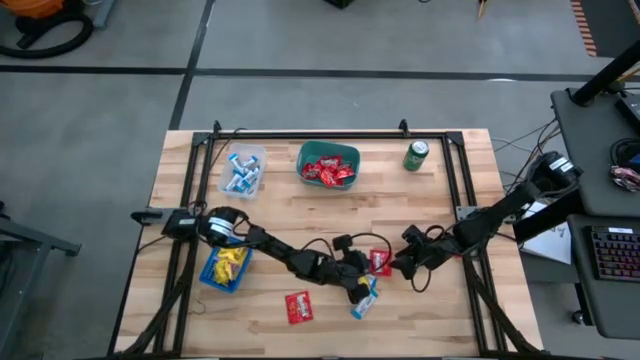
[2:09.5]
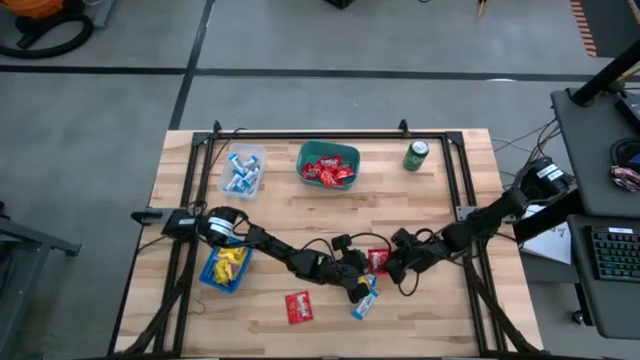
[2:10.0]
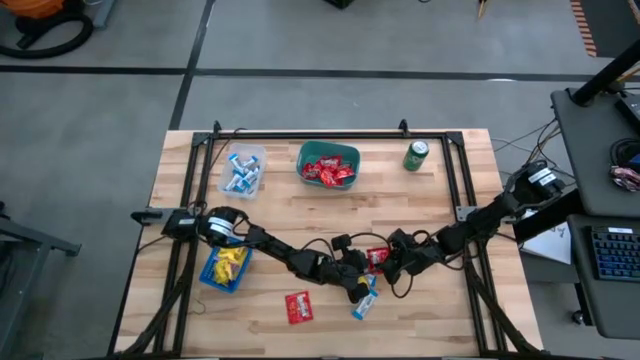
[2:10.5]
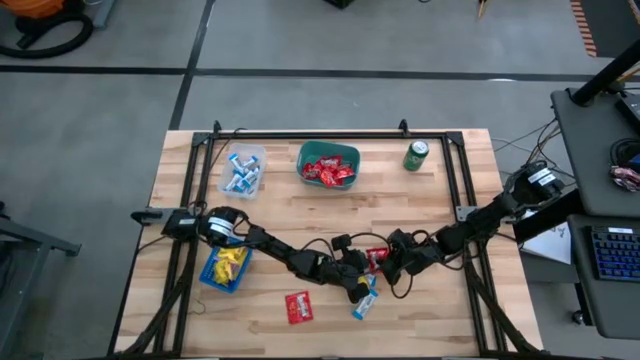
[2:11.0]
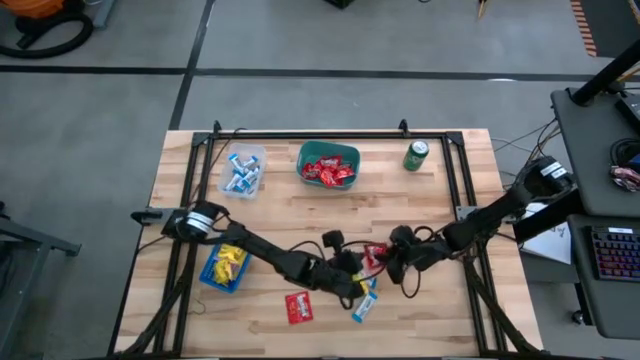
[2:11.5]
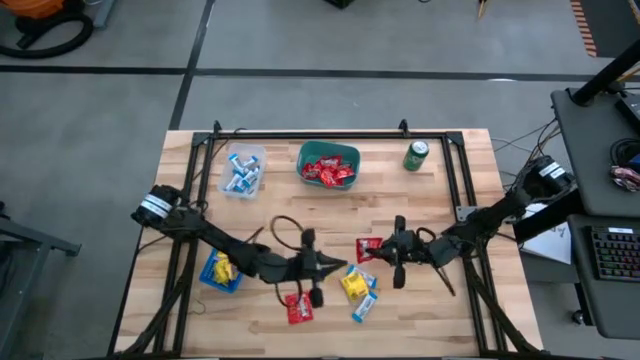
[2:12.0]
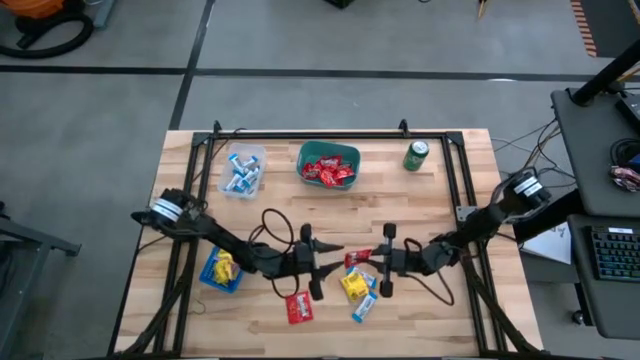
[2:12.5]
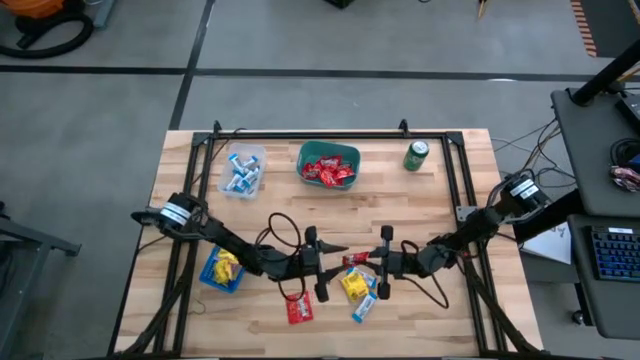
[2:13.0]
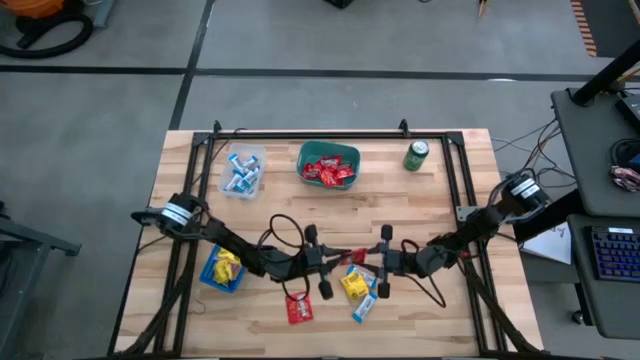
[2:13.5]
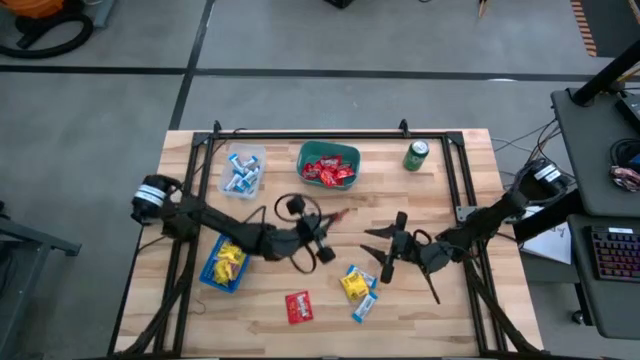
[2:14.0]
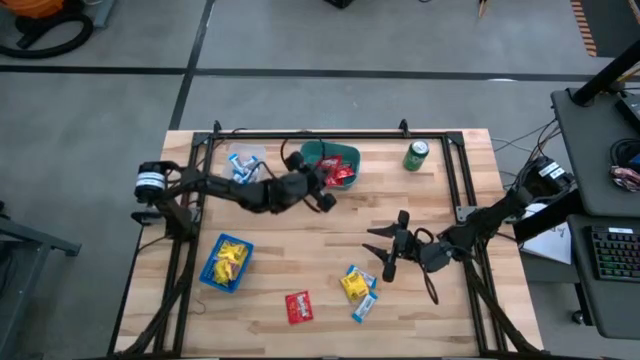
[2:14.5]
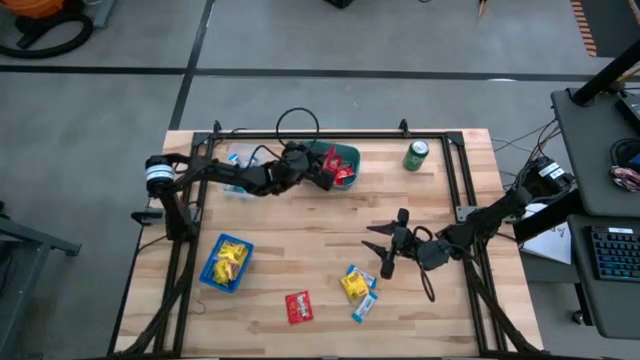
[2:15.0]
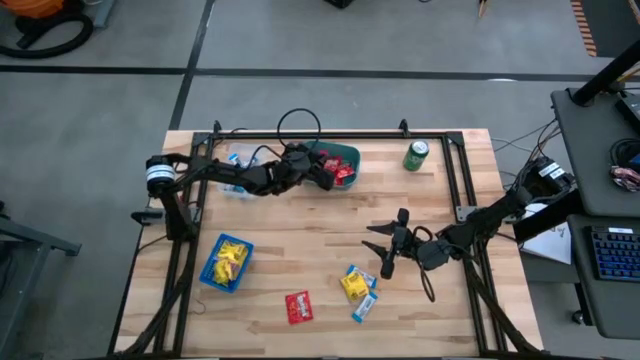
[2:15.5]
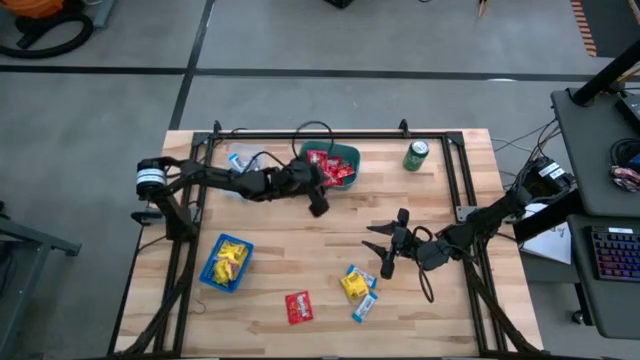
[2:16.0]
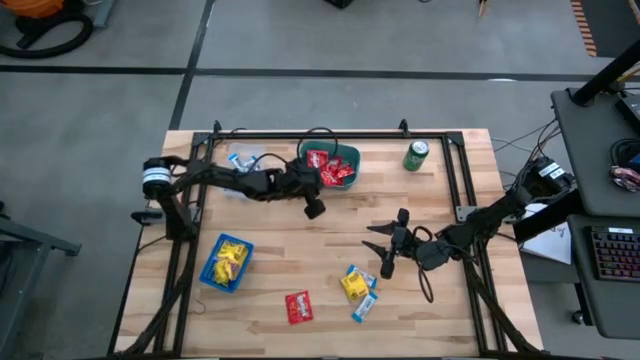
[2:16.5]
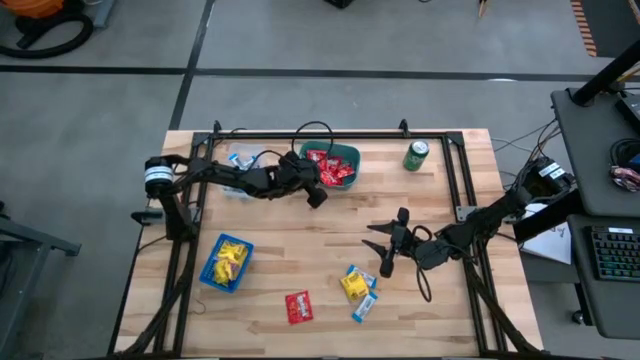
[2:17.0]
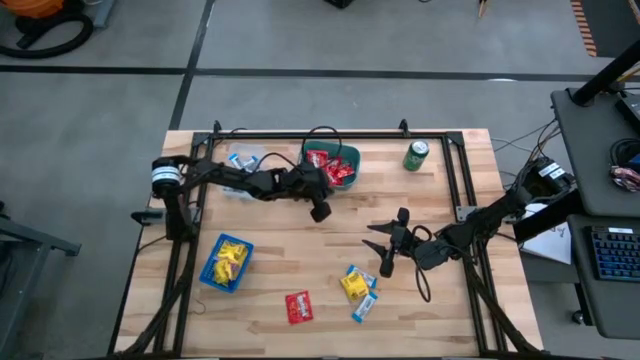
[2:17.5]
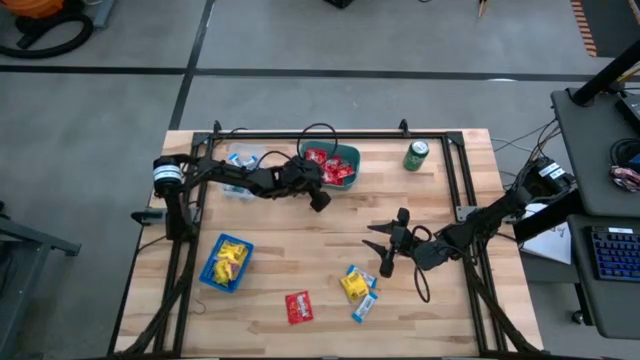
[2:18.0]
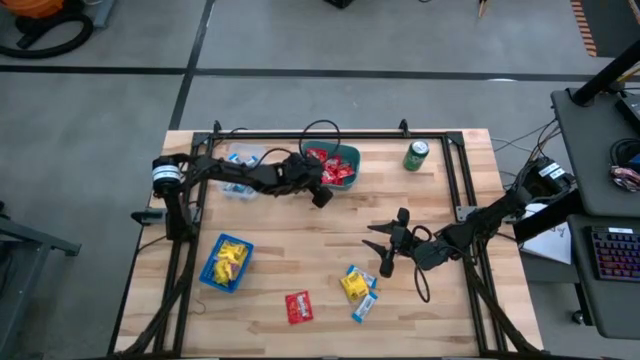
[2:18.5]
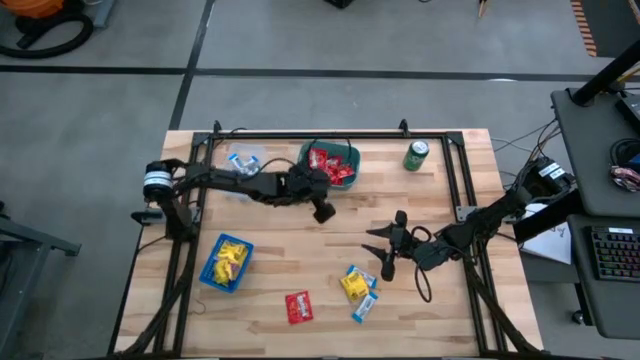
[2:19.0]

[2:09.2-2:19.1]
Task: Sort candy
Put the red candy into the green bin

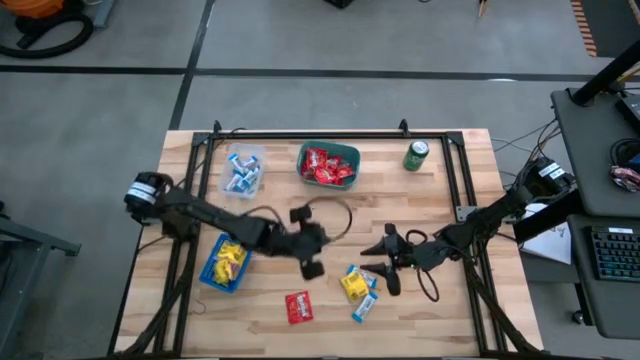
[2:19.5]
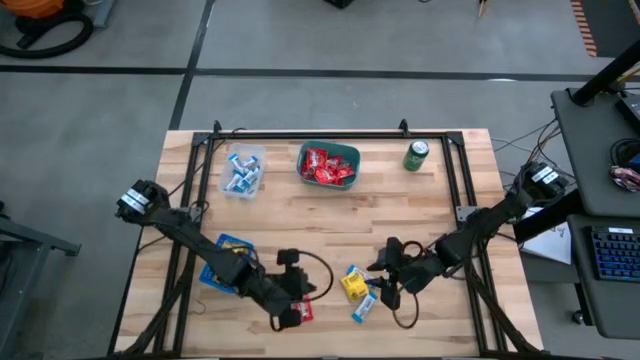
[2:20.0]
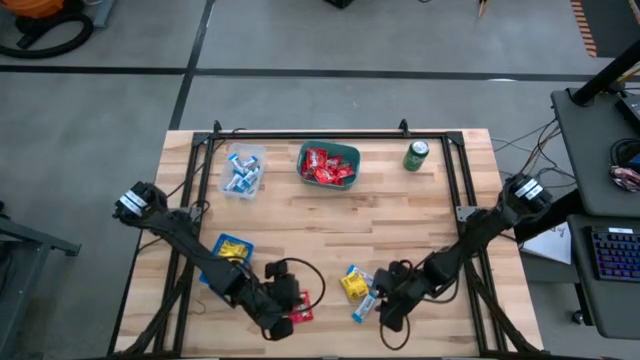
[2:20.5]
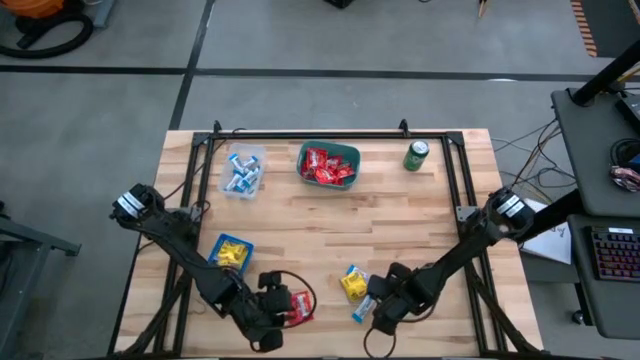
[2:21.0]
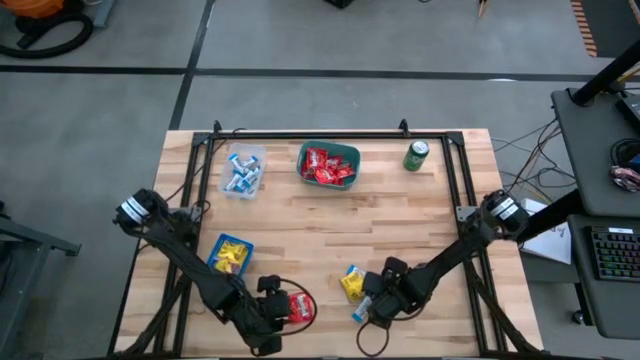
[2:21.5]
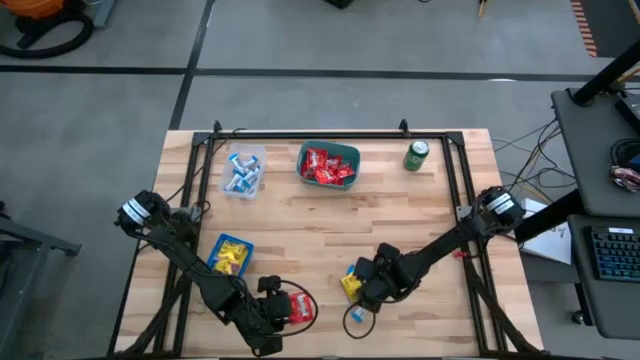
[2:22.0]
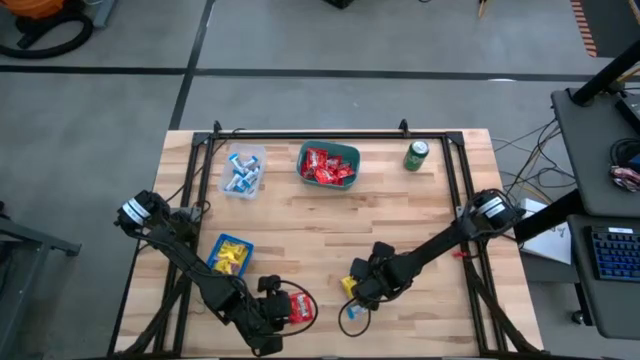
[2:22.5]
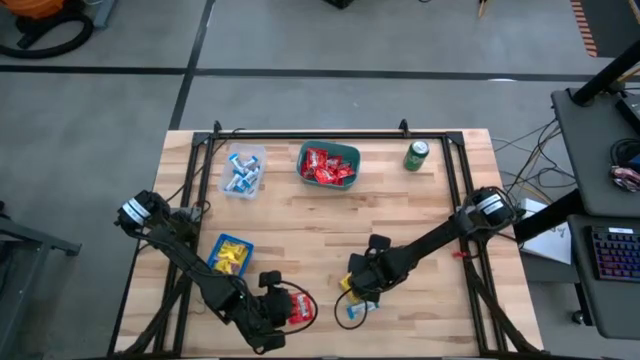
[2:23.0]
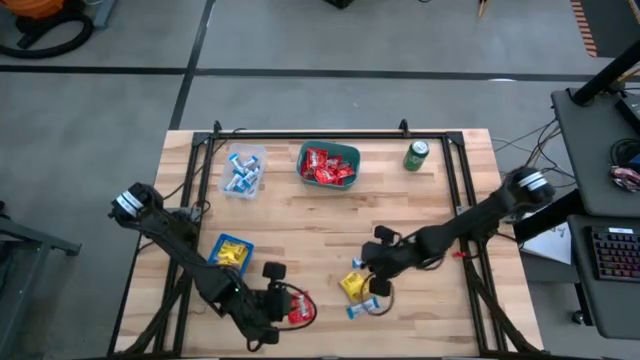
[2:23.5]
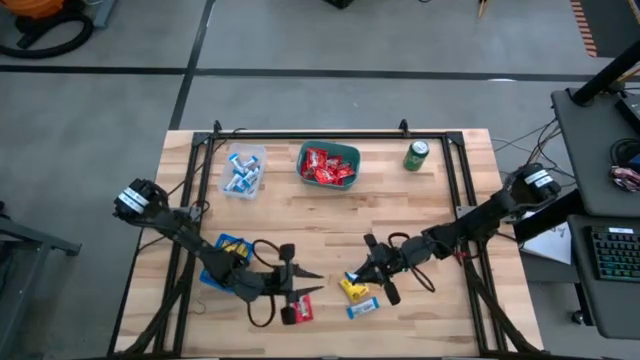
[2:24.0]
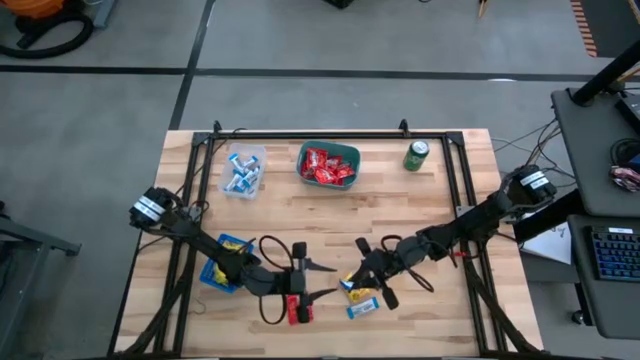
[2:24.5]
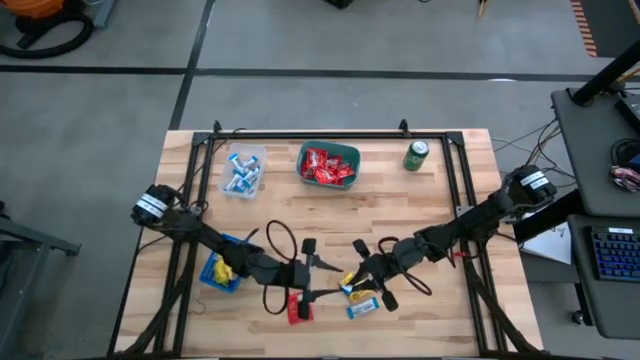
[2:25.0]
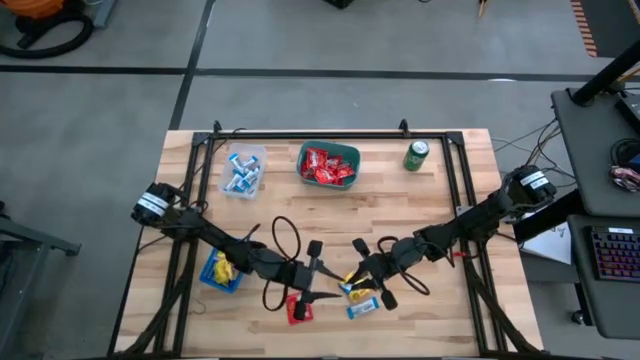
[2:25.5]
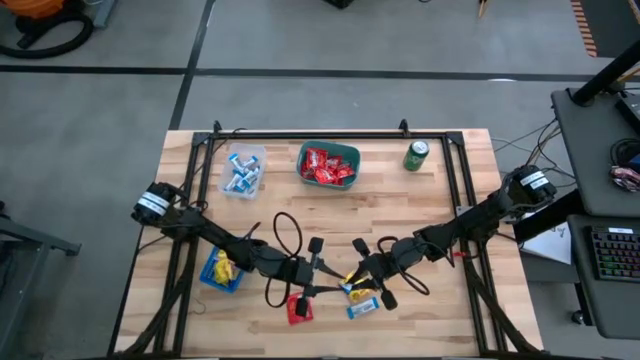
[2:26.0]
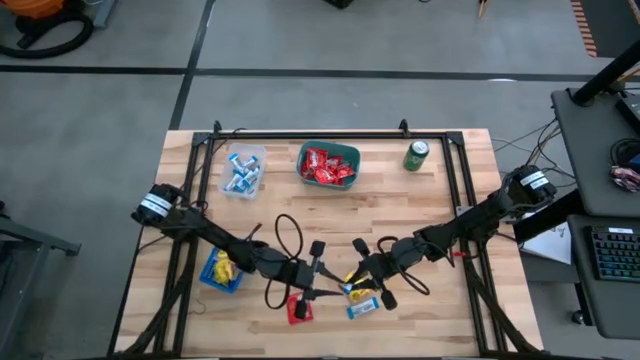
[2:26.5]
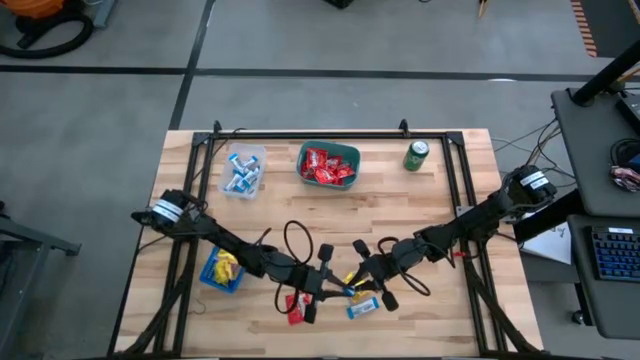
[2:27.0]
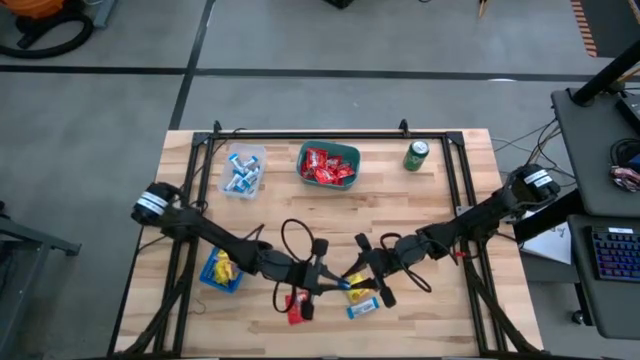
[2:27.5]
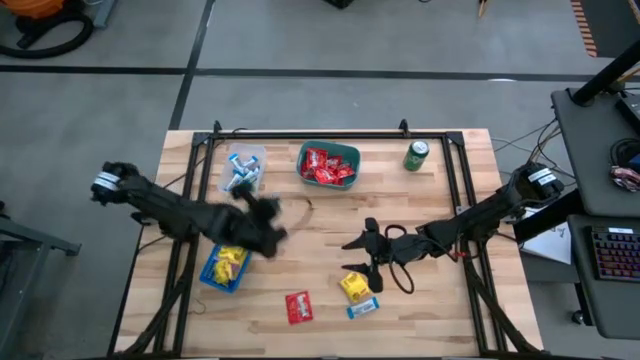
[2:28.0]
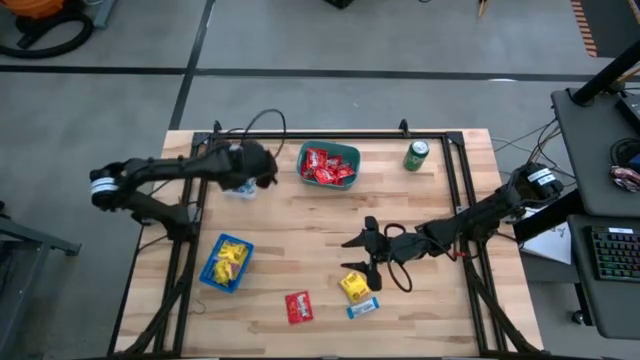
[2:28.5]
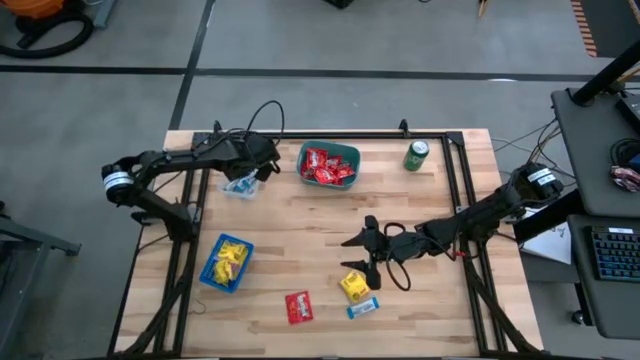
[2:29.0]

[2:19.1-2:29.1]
Put the white candy into the transparent bin

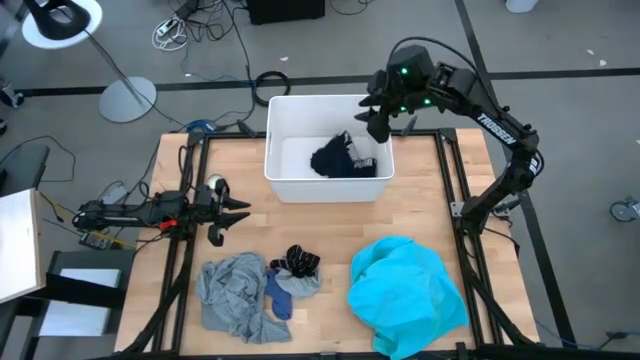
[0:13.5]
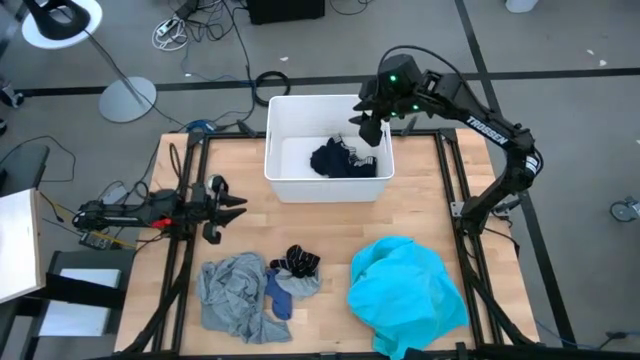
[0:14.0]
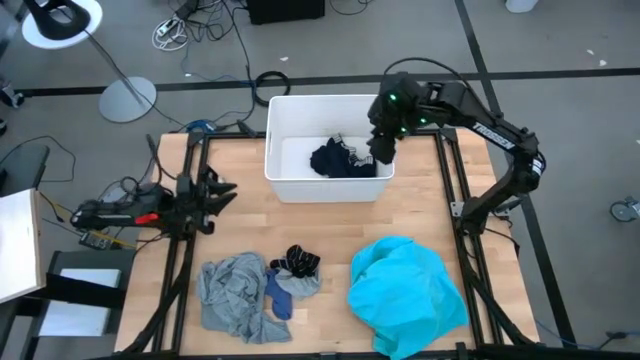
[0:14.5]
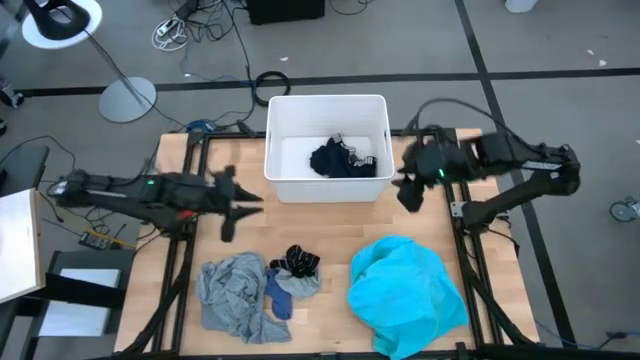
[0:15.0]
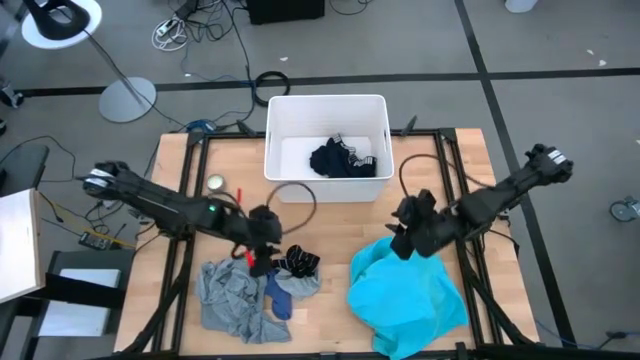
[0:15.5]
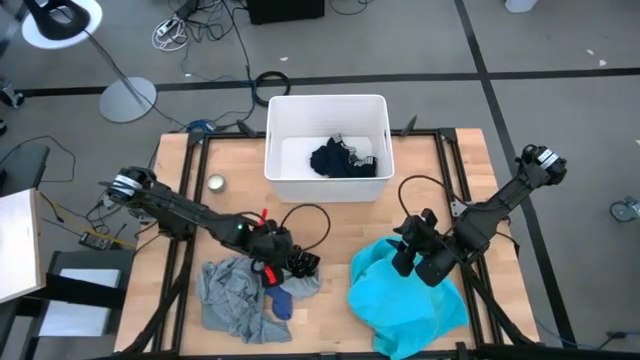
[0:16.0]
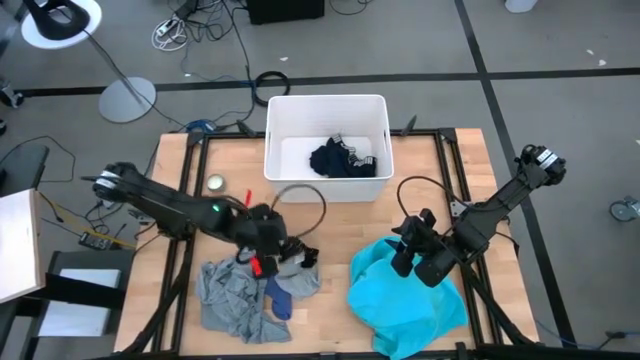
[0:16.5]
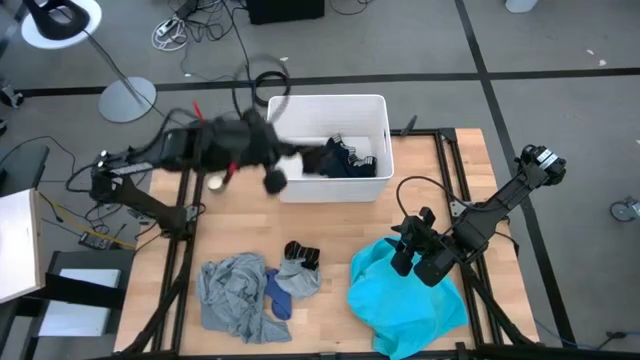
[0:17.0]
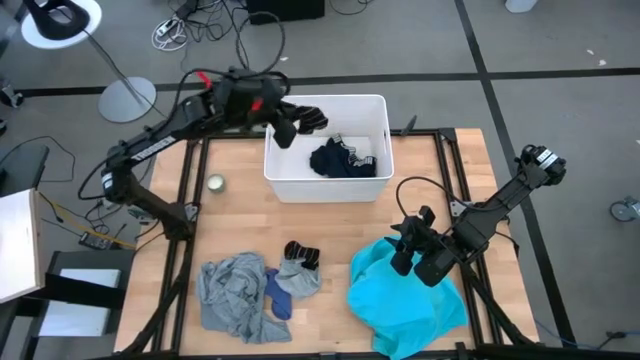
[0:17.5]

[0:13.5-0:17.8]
Task: Sort clothes
Put the black sock into the white laundry bin
